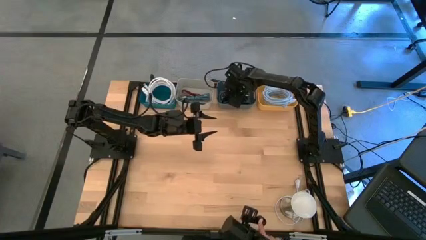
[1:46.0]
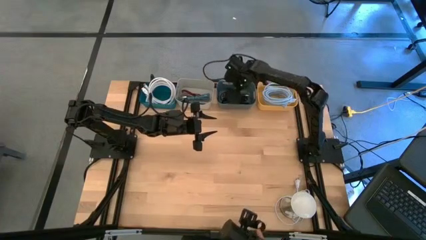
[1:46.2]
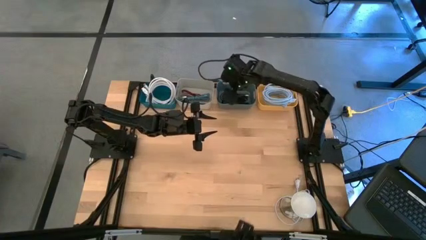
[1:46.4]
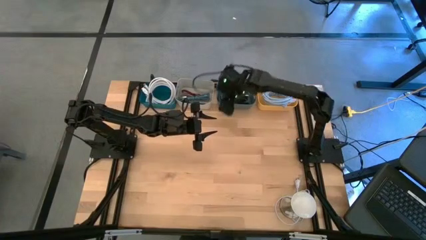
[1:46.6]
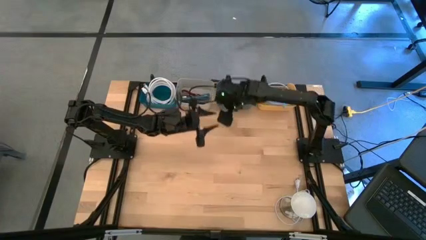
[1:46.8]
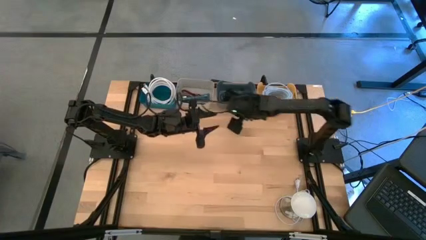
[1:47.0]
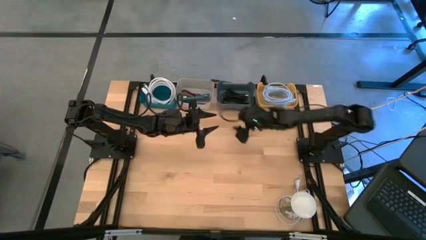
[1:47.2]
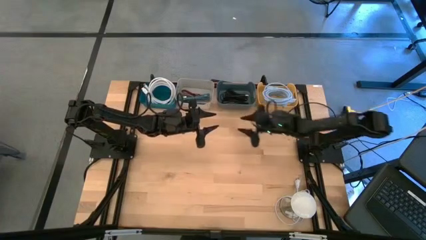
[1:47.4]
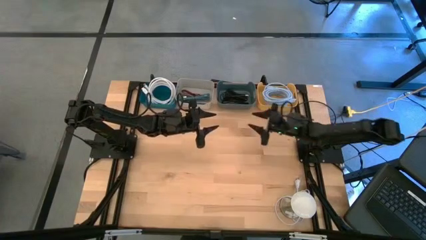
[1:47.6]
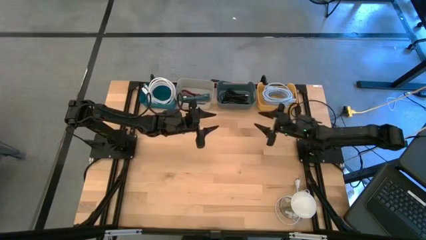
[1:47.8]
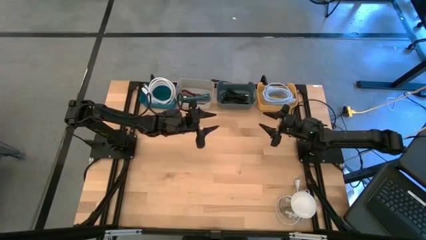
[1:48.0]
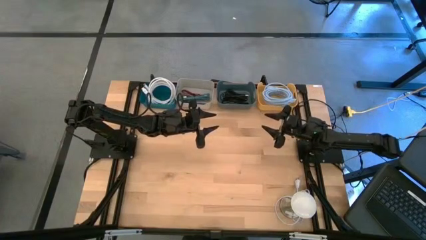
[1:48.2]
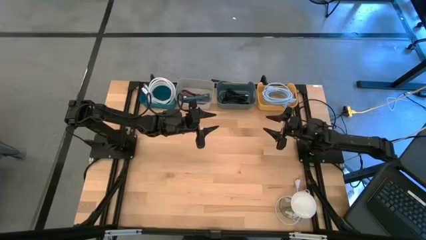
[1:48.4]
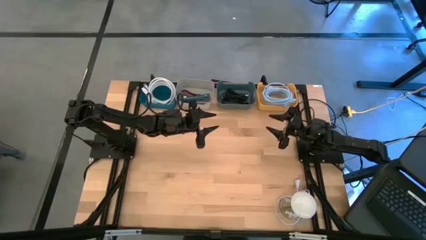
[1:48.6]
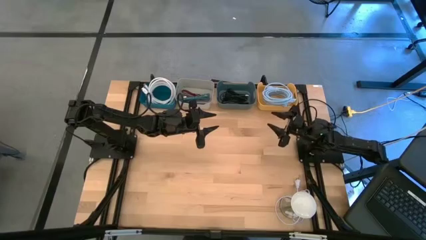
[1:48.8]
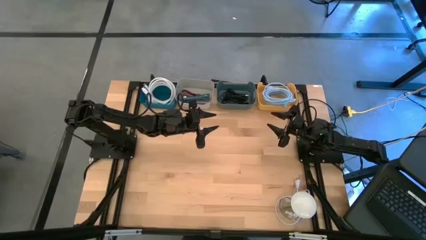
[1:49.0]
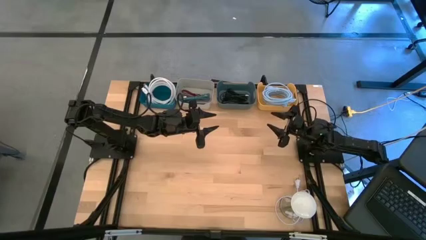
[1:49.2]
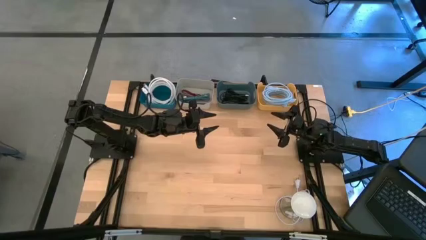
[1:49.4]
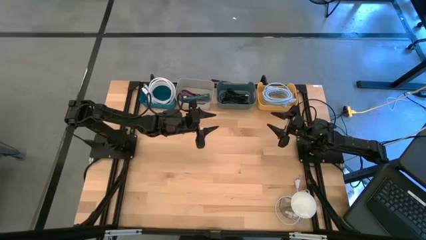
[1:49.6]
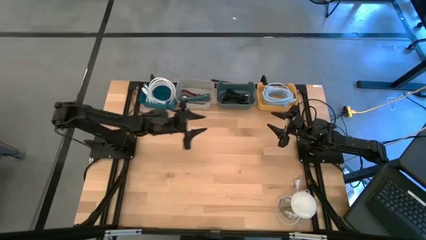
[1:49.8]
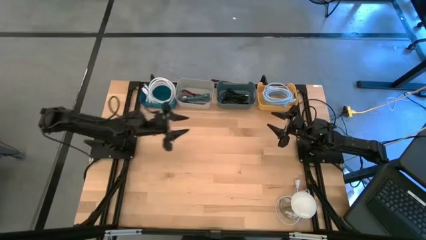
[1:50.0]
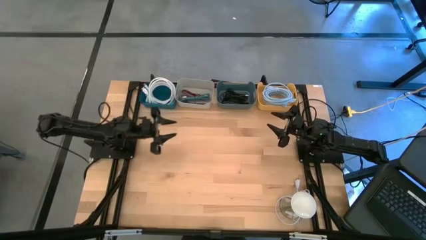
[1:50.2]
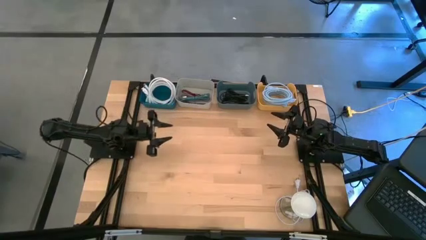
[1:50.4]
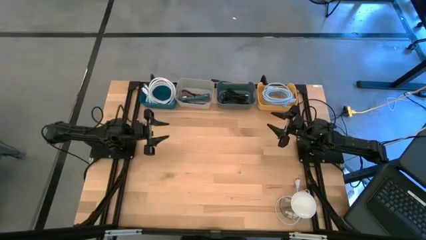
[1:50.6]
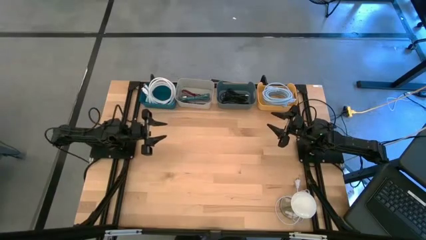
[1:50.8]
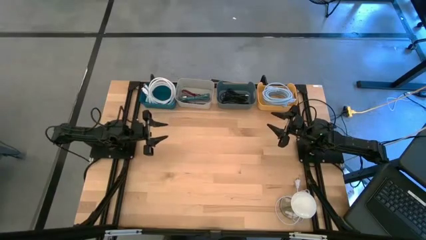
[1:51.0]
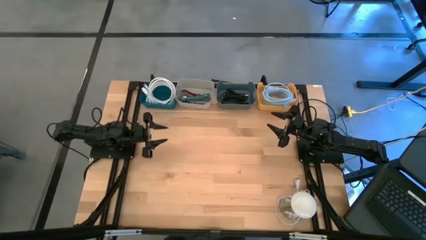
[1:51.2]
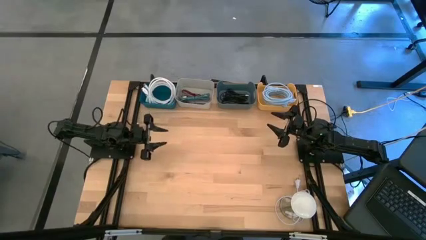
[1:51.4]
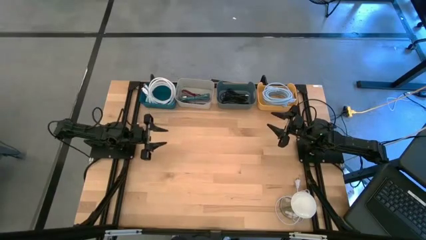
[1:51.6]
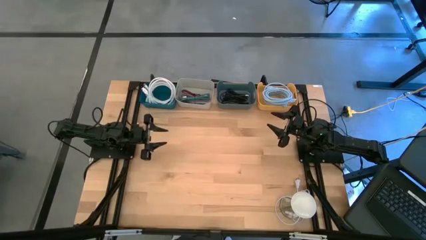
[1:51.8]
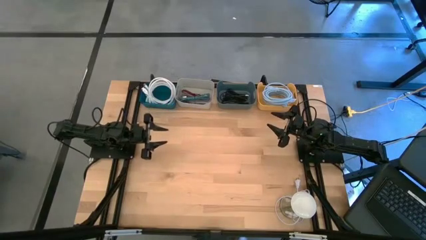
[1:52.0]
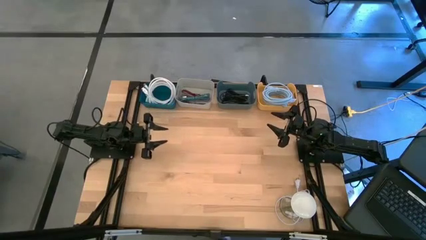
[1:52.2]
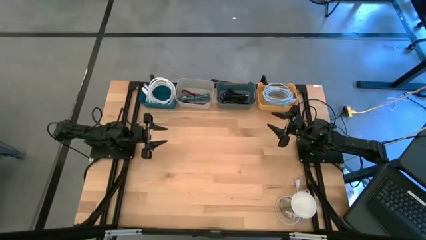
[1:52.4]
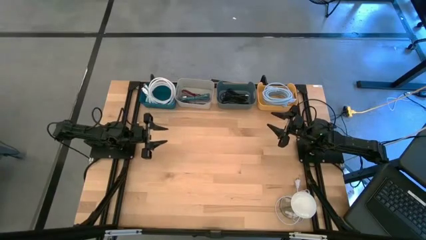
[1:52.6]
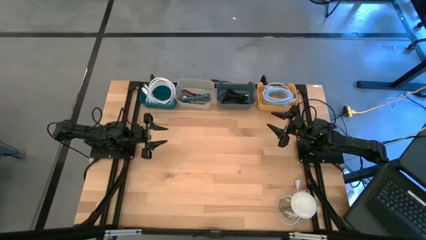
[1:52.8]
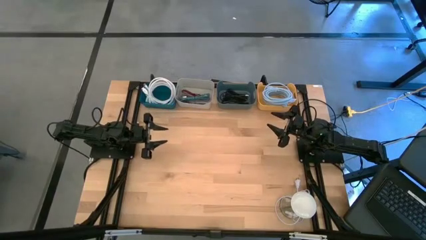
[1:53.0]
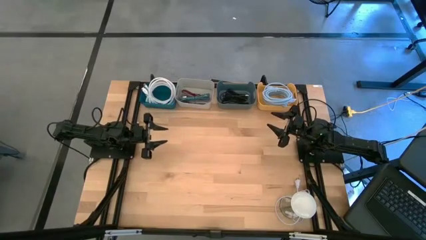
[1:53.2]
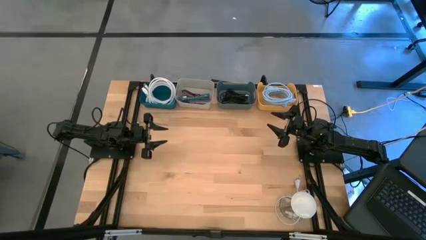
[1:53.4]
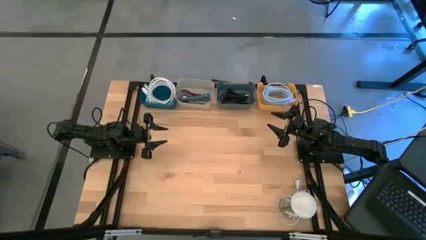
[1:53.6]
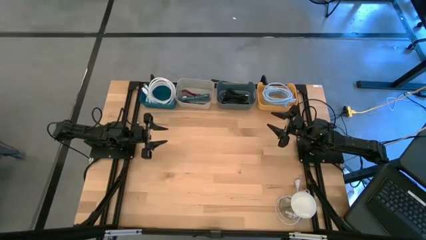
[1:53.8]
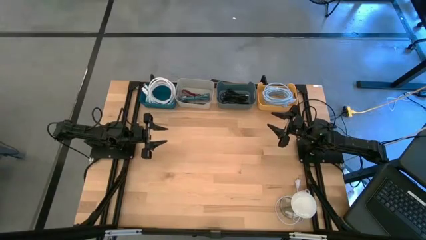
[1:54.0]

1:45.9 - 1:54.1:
Task: Pick & Place USB Port
Return to Home Position

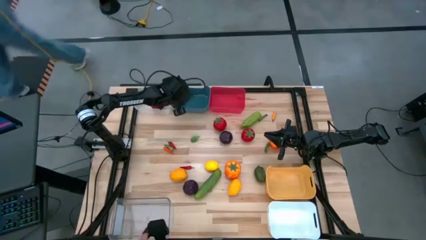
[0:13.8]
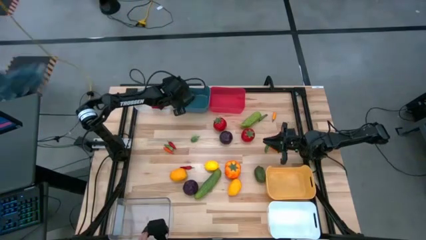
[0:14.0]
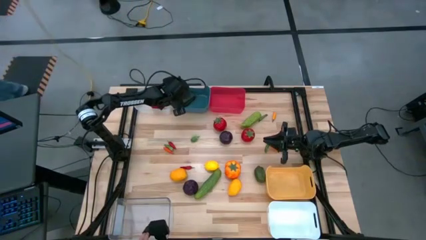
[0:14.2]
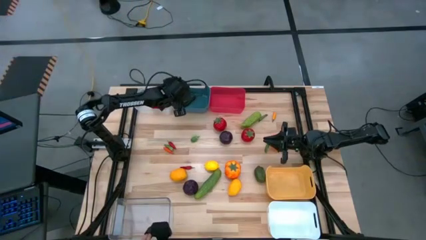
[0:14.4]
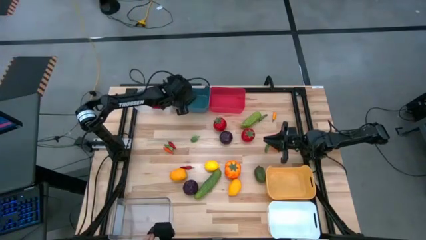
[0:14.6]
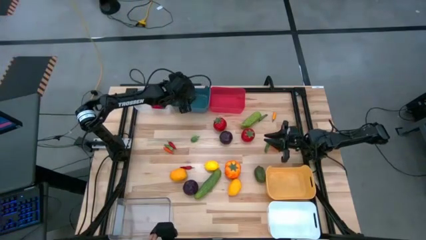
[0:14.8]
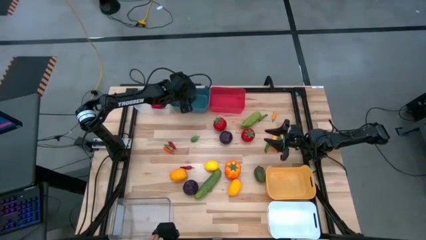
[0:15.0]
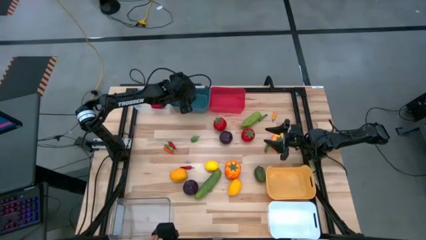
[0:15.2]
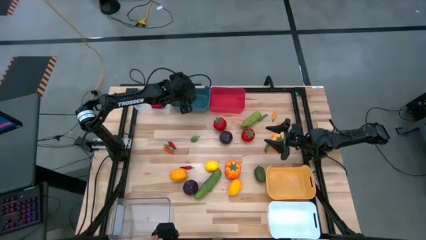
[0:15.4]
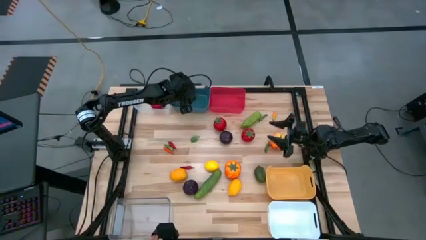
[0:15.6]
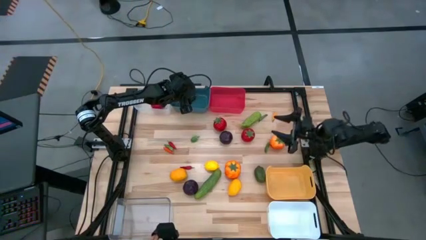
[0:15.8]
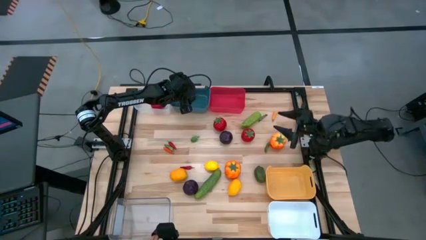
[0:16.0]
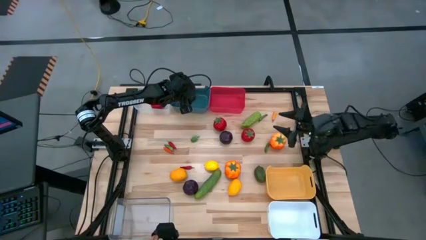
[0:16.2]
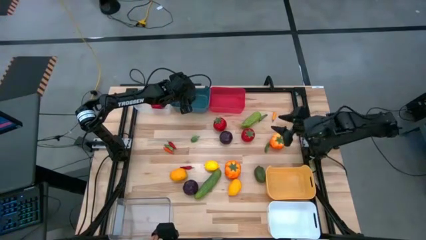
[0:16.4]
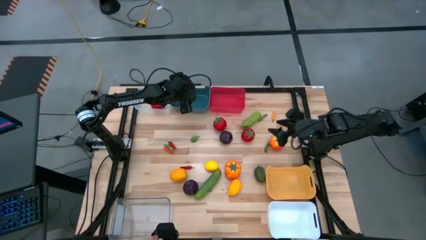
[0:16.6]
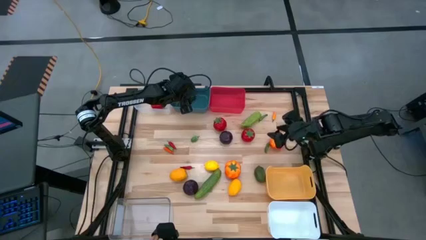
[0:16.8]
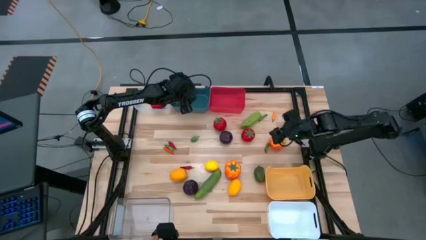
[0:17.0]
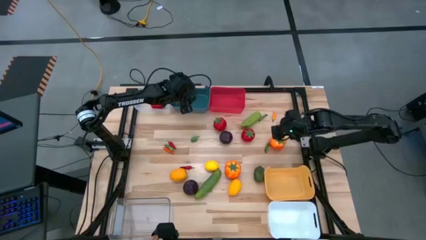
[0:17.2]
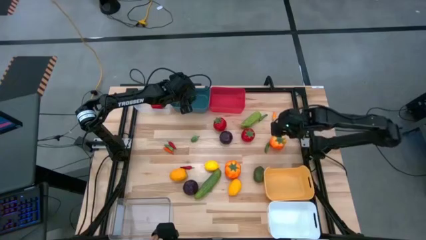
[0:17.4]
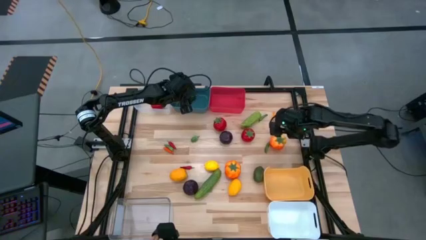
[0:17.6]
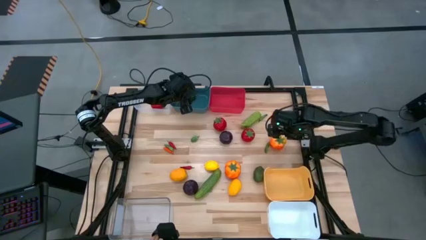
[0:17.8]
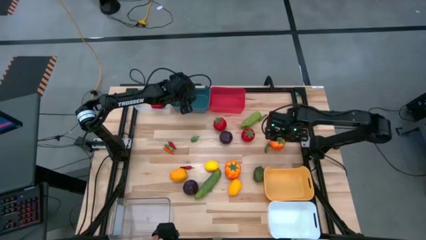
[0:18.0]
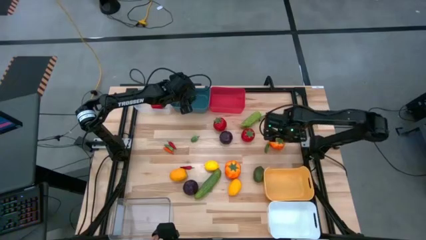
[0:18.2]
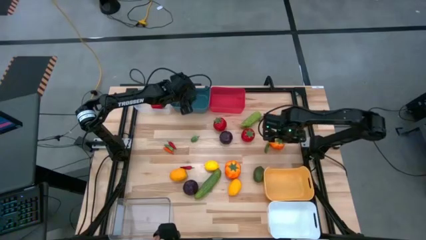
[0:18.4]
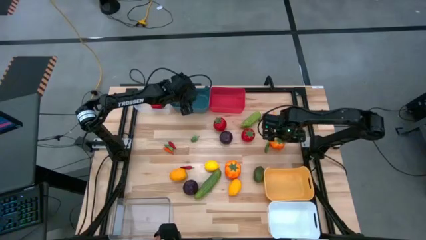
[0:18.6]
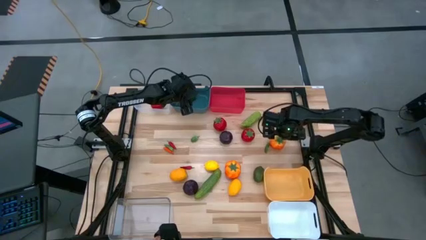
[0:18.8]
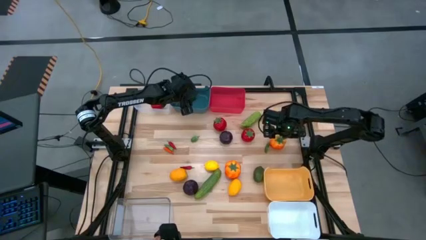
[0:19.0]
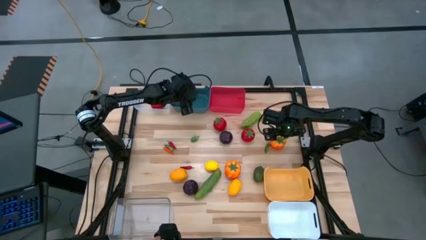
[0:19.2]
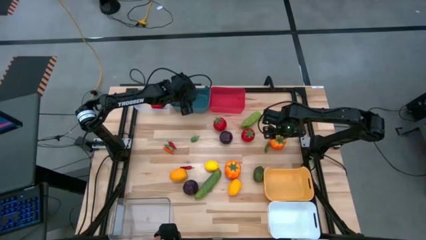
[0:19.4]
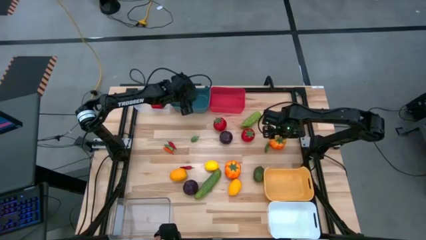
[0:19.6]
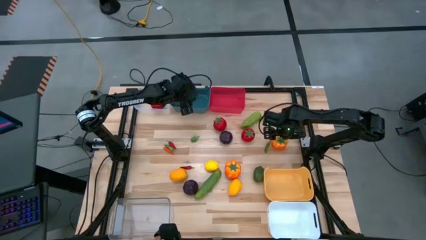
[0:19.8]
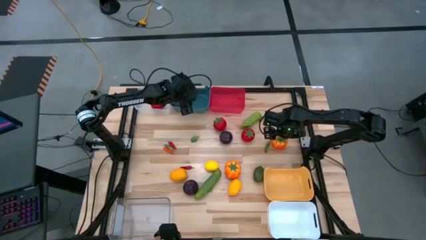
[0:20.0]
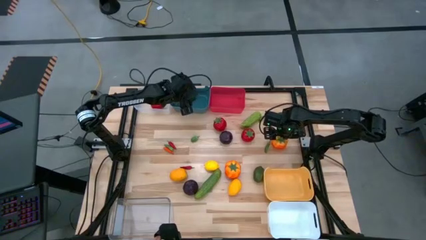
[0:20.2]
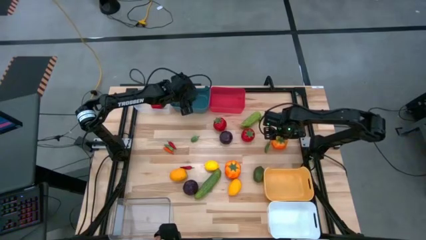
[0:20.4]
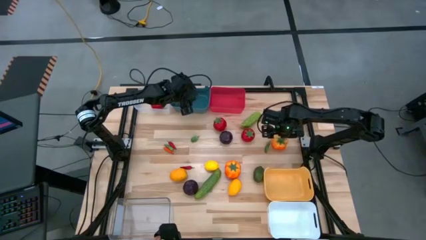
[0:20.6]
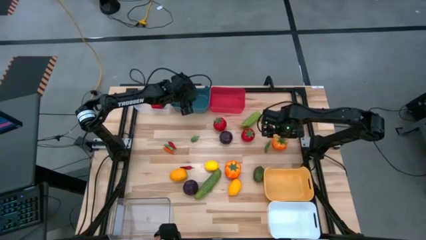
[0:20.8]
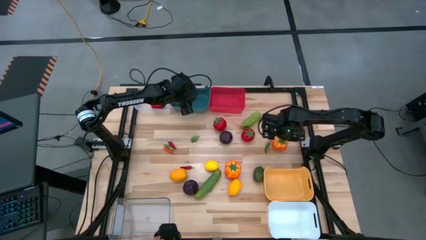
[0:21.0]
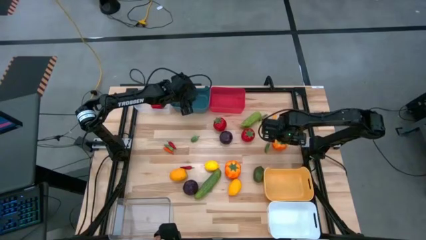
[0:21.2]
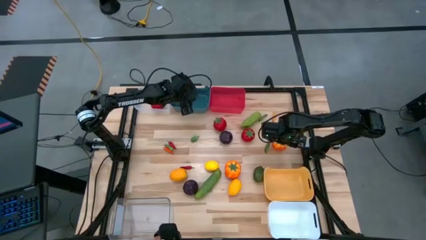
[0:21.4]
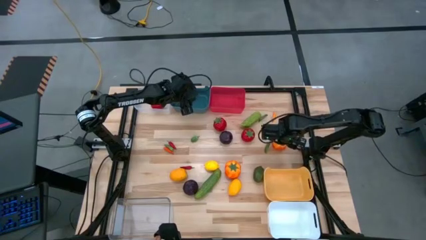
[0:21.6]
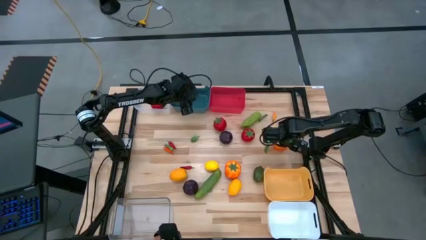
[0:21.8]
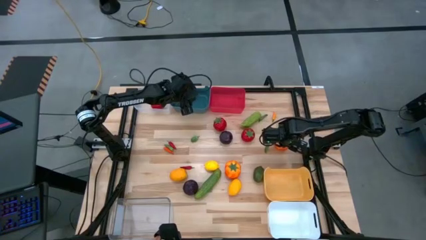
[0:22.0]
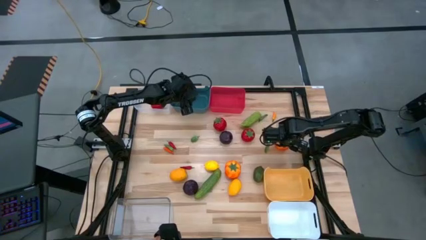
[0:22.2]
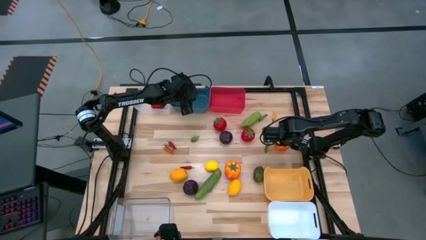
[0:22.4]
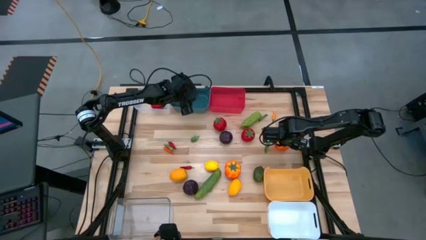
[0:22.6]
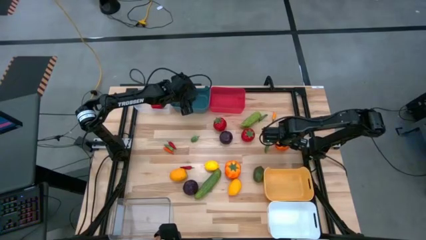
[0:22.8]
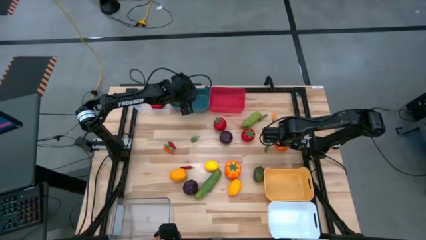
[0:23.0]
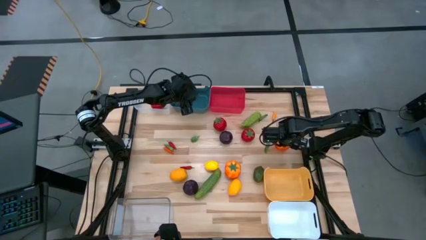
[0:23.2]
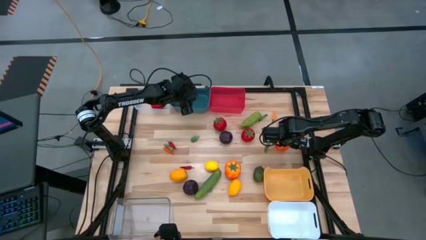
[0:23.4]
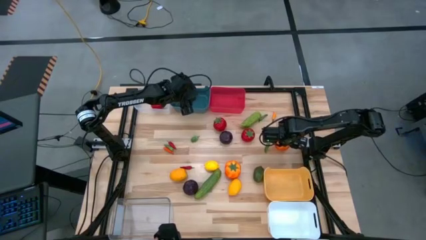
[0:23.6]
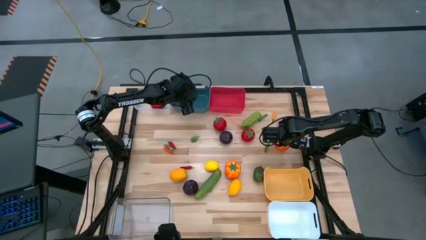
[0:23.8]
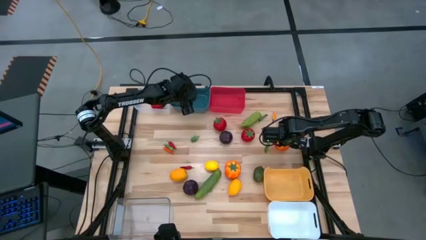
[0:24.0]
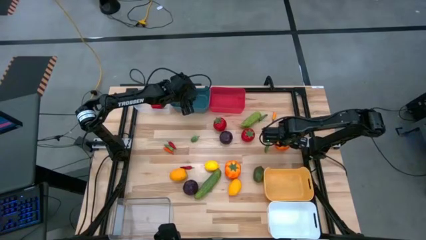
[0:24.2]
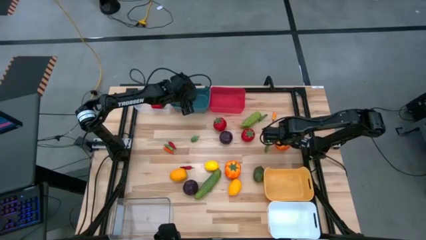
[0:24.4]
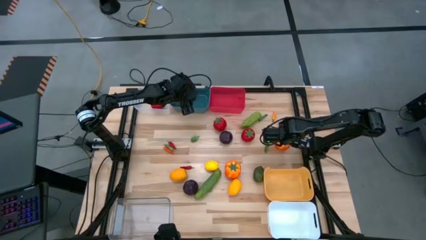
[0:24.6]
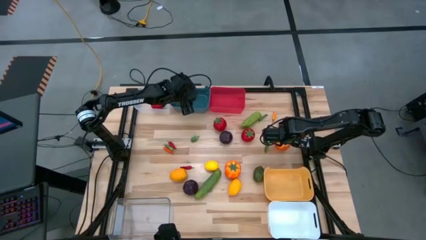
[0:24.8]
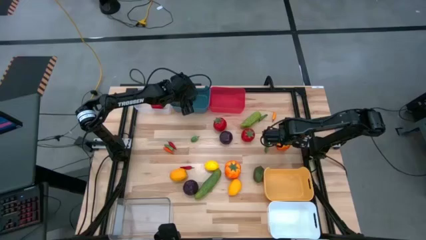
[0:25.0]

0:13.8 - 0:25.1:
Task: Sort produce into baskets
Put the orange tomato into the top transparent bin
